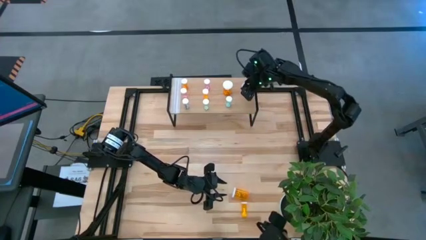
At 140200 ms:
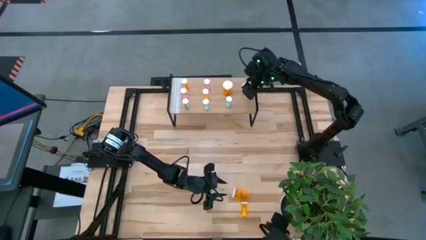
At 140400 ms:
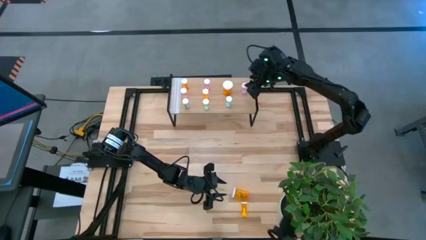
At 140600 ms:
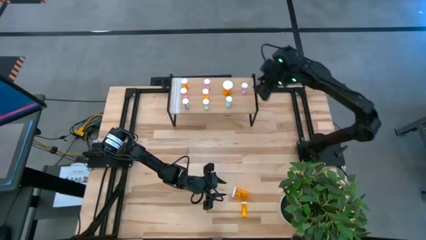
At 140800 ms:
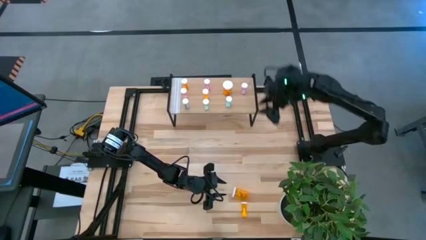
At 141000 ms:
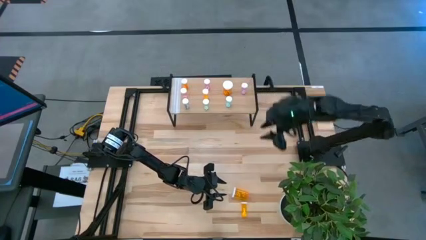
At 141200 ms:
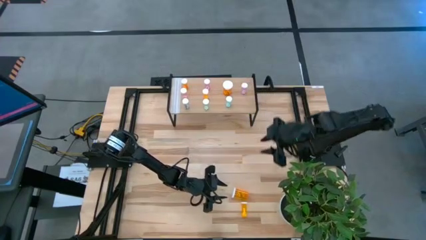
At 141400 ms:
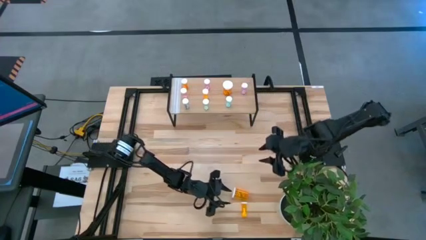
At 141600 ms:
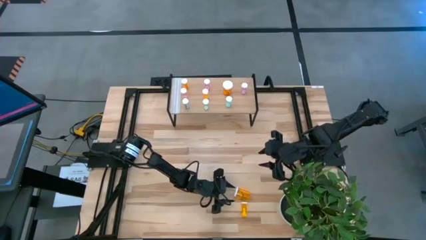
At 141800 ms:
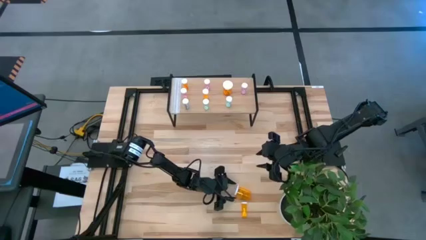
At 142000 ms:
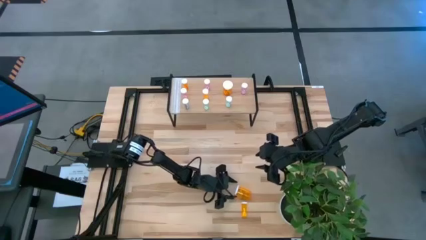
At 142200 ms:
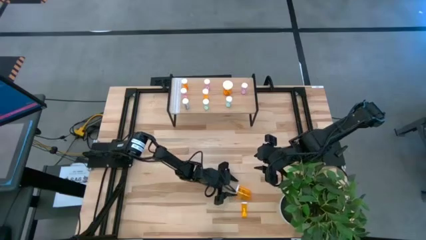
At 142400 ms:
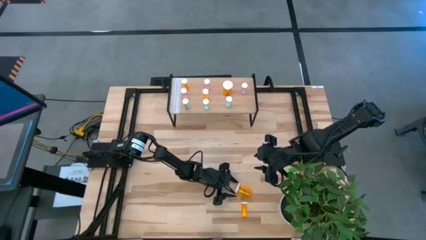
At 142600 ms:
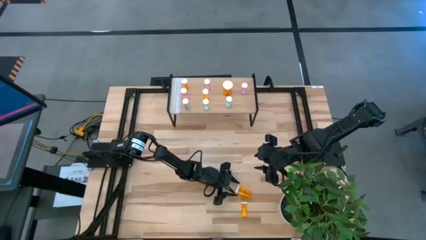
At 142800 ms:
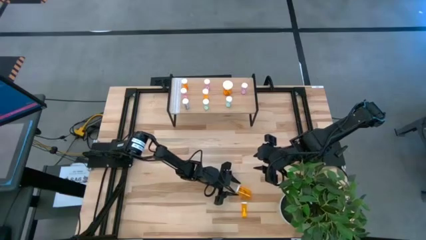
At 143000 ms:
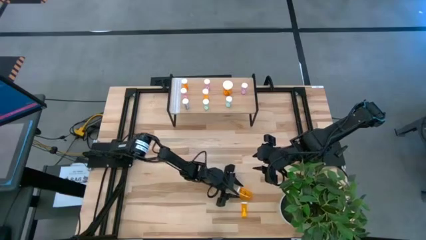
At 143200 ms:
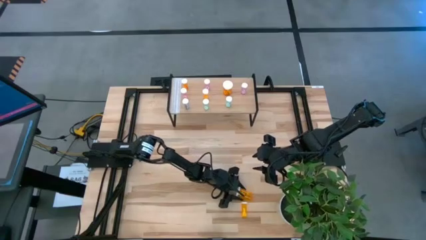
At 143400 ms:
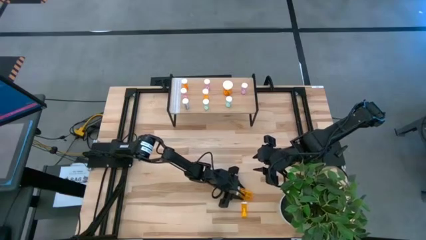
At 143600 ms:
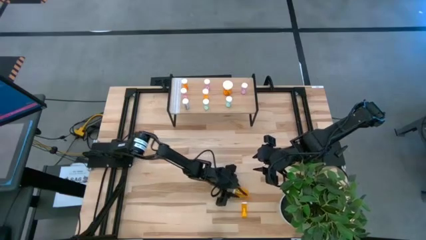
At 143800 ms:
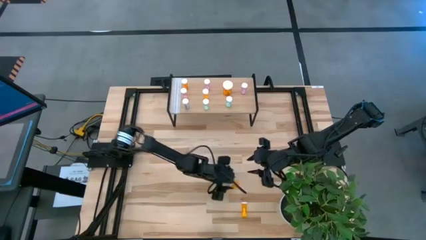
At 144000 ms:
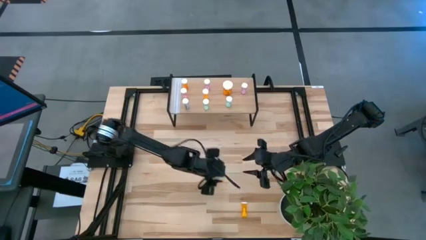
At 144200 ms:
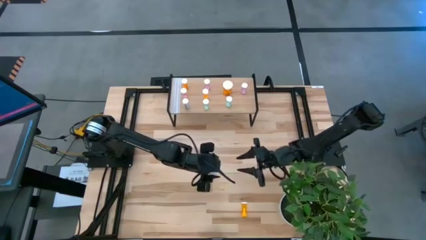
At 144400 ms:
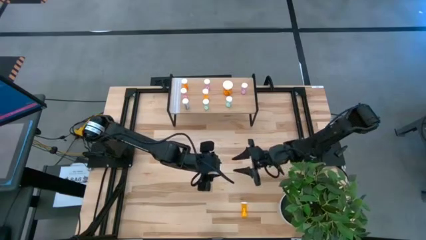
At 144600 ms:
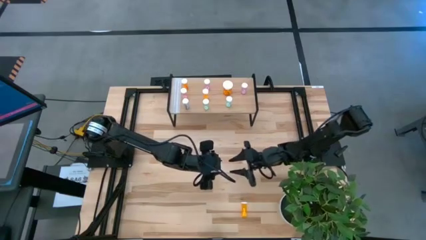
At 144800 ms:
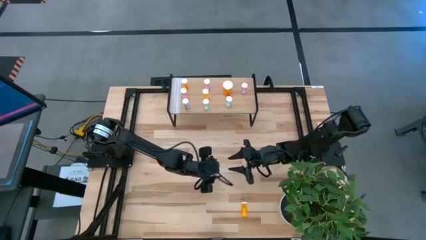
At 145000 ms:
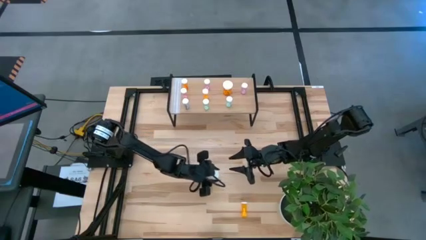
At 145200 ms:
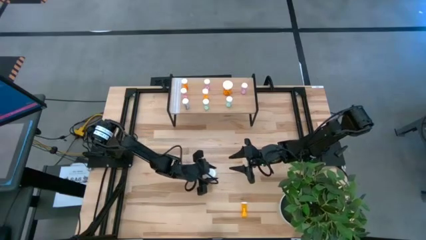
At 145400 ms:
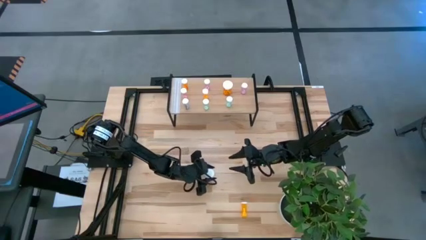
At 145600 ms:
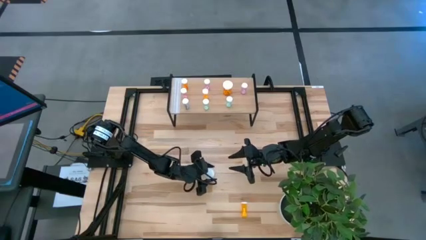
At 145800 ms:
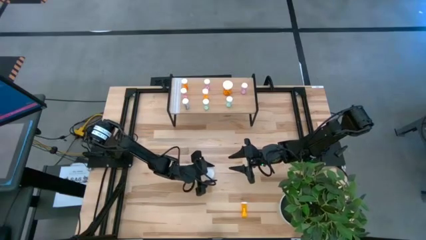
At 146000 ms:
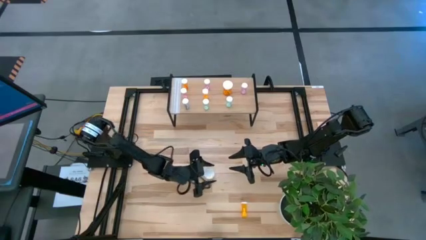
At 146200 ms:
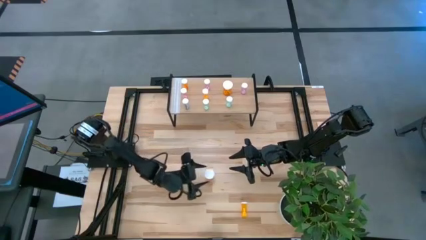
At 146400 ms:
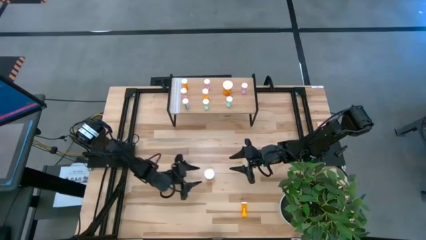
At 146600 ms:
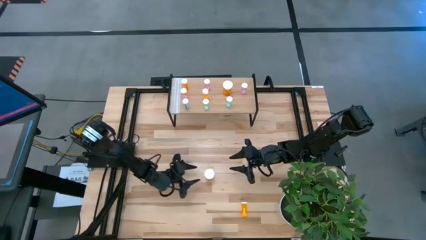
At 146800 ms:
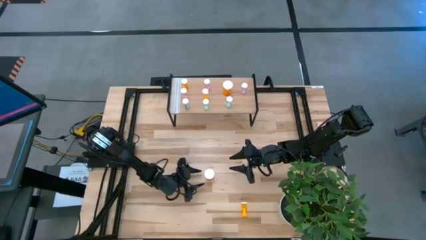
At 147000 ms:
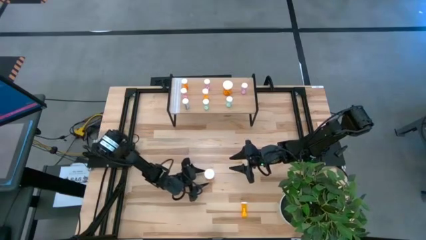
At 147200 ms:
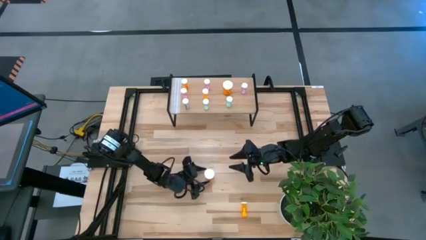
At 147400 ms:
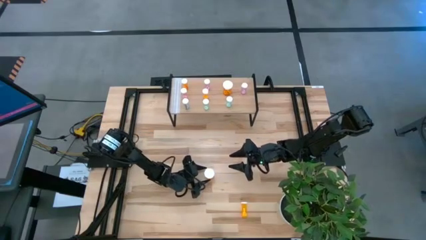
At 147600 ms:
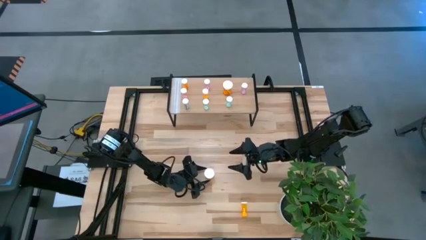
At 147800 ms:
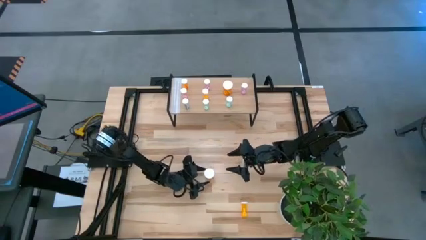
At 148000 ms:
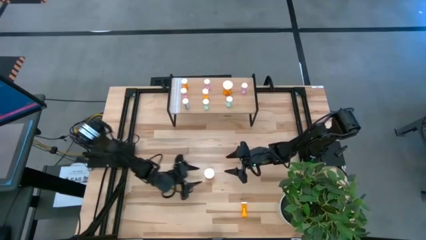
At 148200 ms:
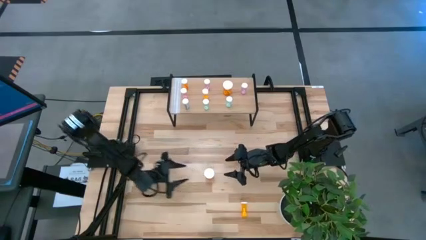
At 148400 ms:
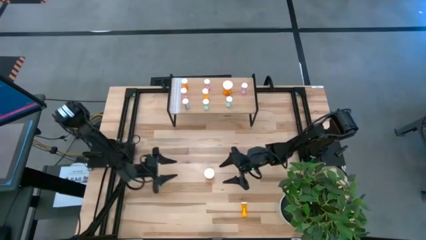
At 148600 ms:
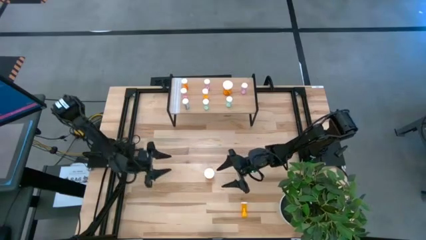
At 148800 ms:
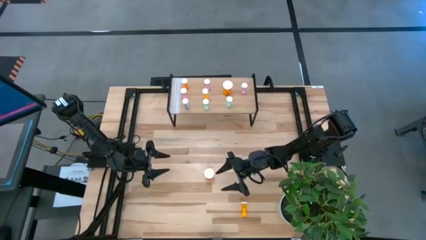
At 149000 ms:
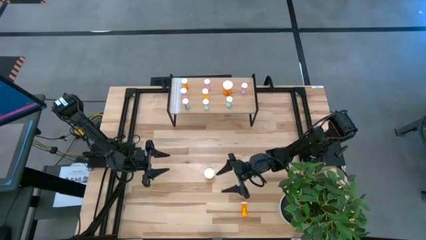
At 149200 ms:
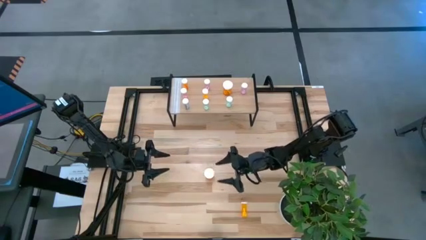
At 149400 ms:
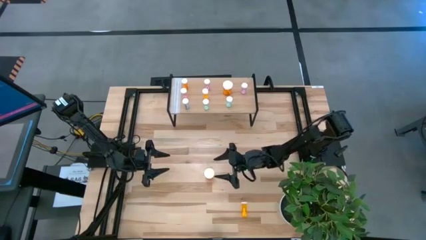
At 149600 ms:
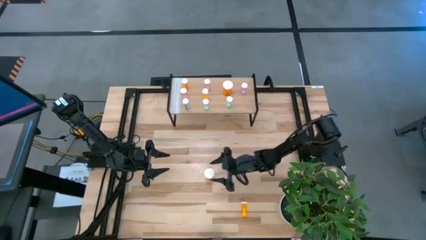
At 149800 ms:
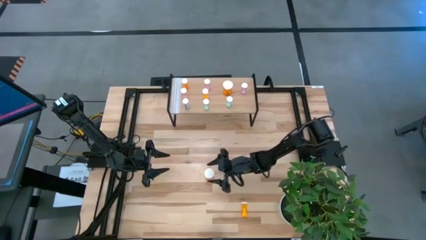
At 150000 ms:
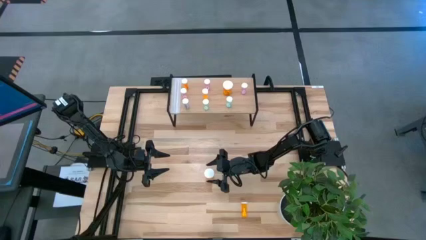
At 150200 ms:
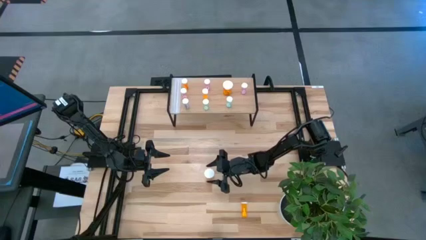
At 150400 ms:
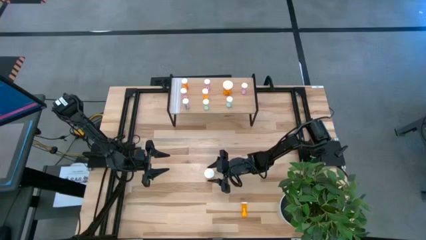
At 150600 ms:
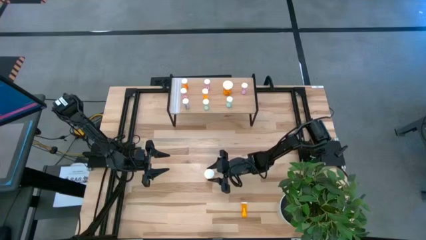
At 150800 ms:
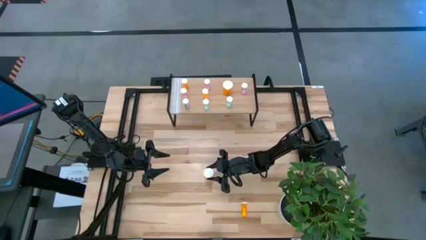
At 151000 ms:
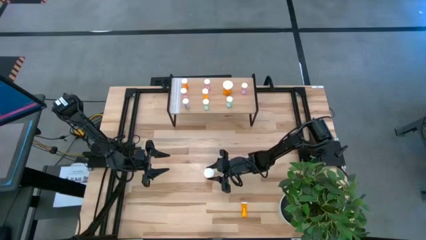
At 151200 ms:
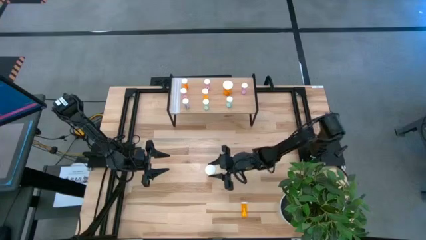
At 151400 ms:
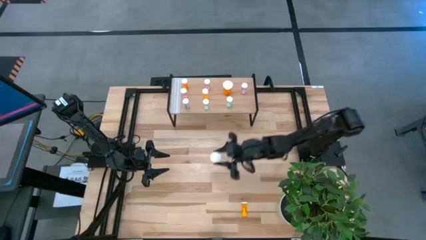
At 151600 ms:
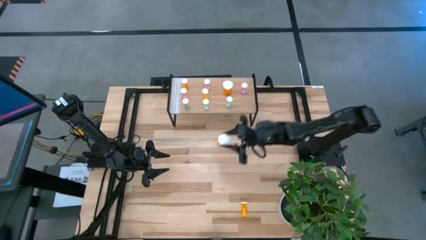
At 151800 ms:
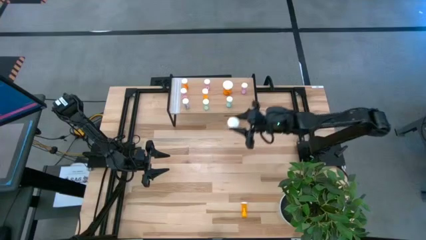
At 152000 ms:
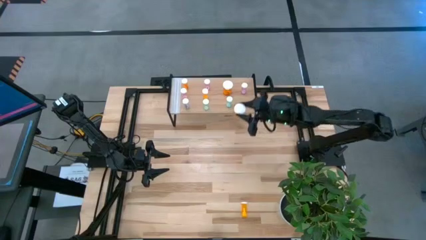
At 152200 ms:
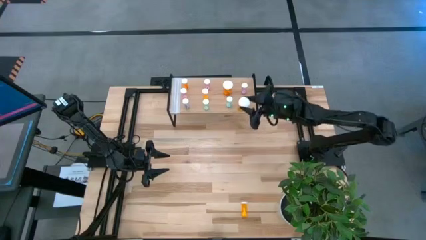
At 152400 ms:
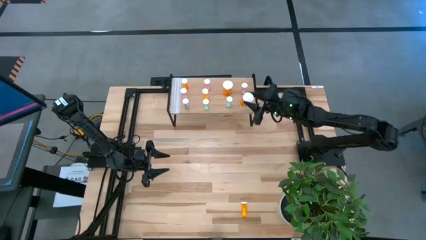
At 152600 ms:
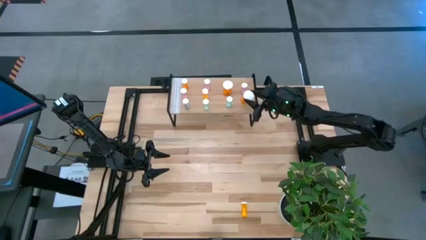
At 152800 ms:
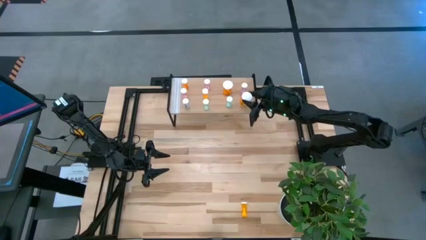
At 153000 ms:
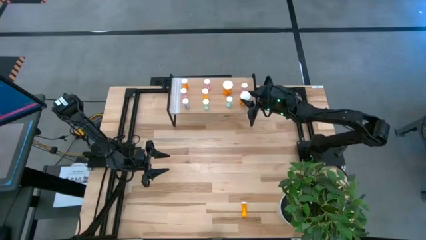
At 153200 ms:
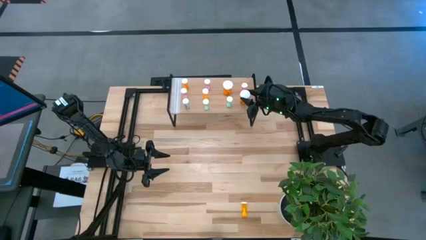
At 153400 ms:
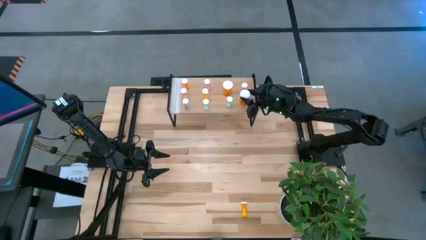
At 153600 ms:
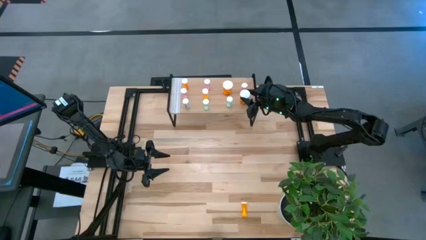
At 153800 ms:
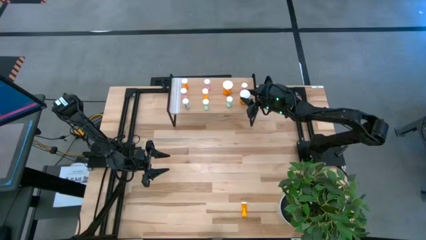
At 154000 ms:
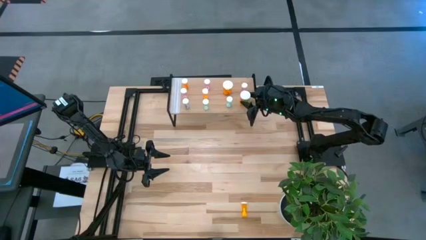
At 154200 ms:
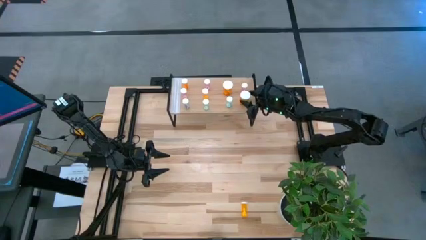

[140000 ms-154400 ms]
Task: Pick and place medicine bottles onto shelf by color
Put the big orange pill bottle on the shelf

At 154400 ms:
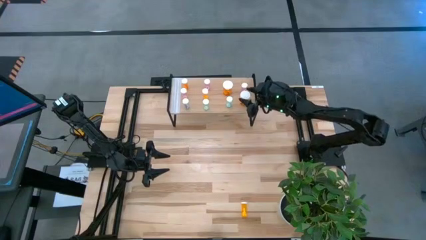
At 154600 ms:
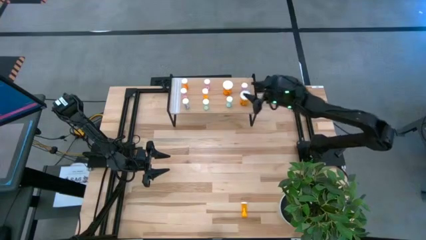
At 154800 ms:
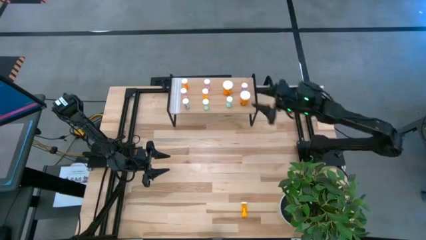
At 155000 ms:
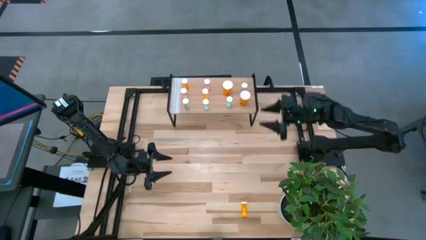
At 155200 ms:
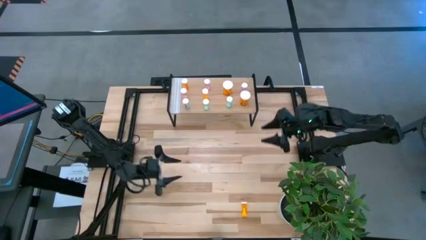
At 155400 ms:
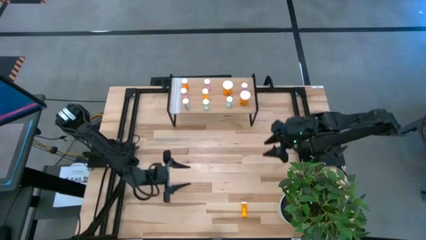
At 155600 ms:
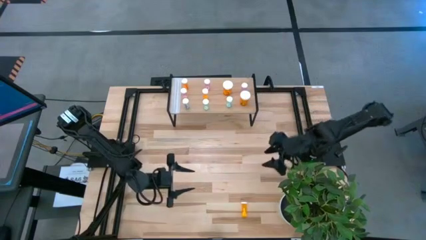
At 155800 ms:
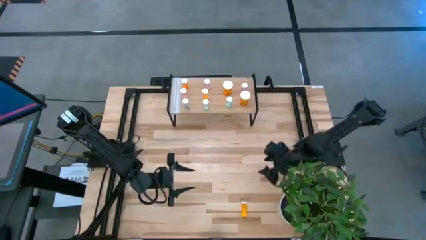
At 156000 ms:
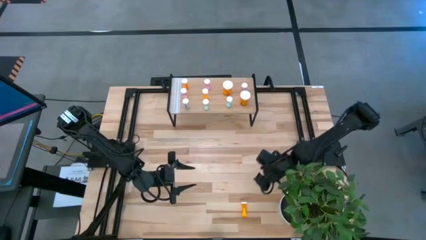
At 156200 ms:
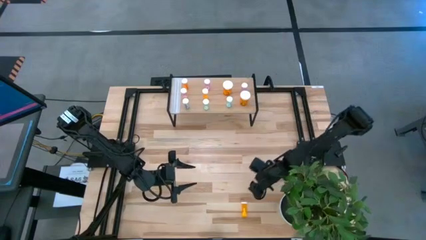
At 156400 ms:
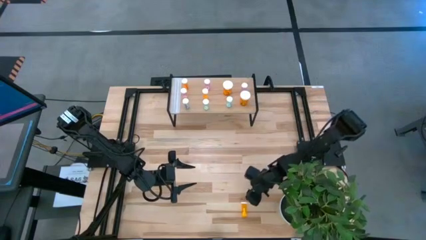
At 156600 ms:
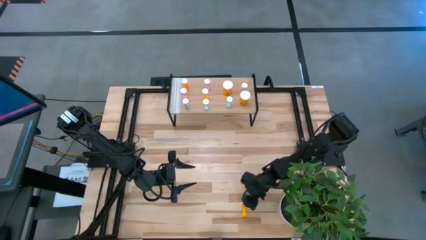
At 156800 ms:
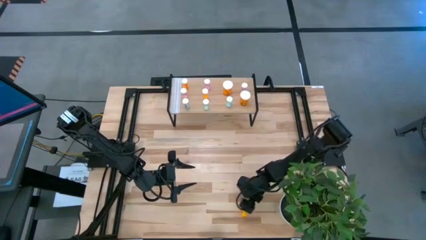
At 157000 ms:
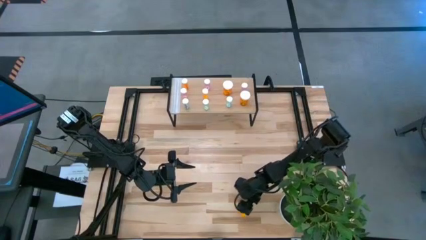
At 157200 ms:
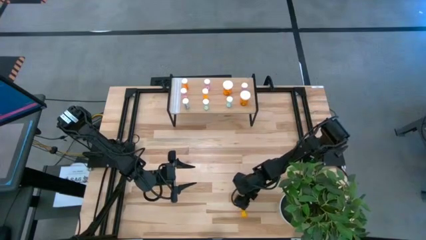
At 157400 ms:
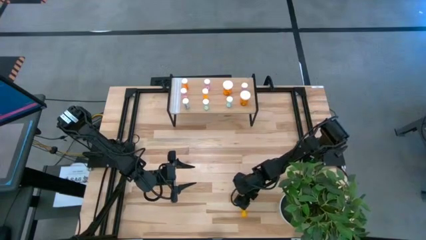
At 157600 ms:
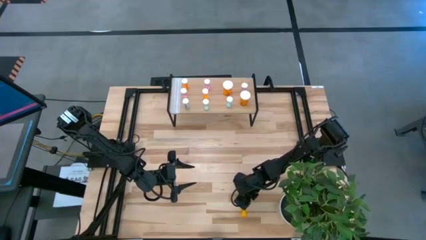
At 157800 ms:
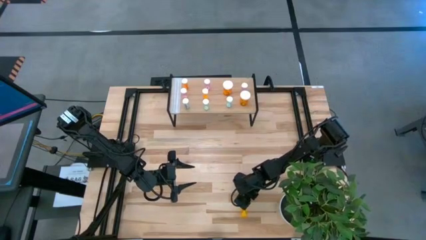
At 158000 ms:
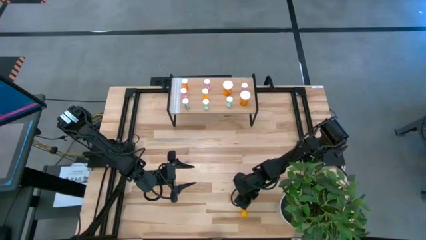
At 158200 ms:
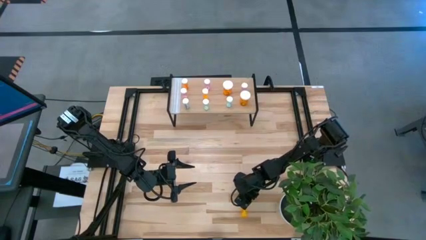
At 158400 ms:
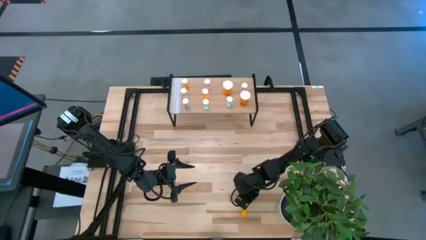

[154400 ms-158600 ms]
Put the small orange pill bottle on the shelf
